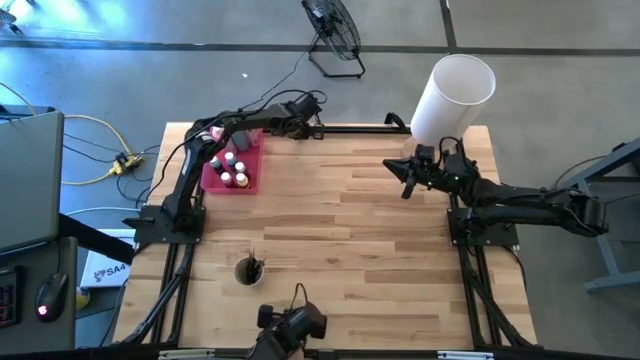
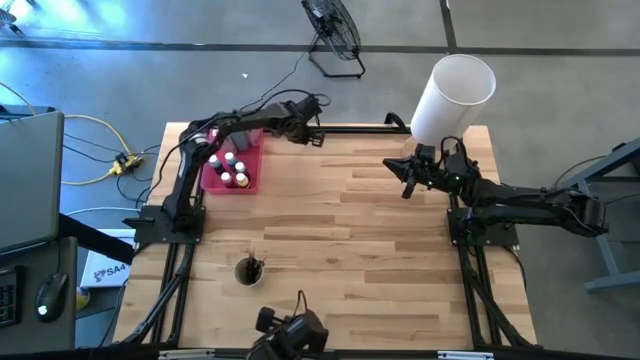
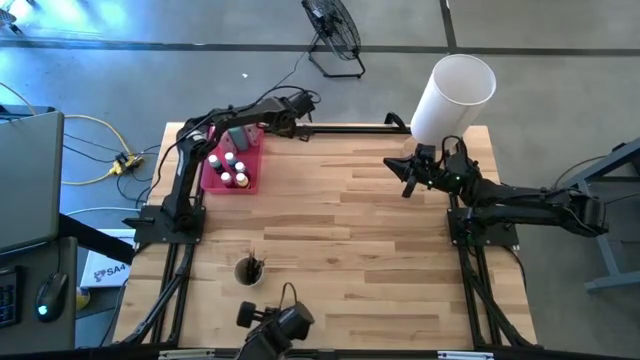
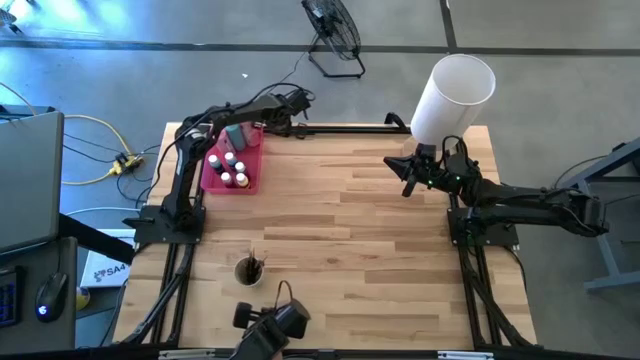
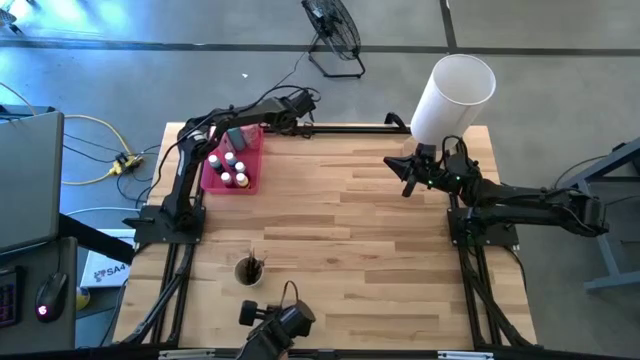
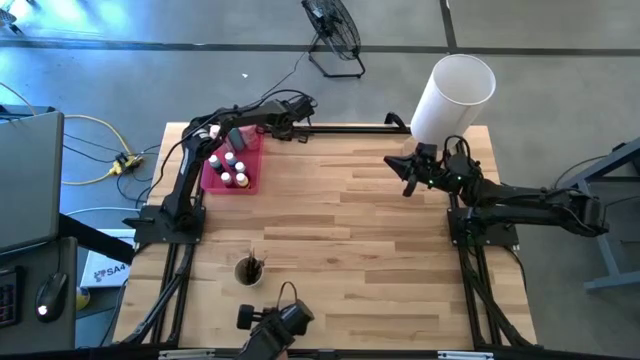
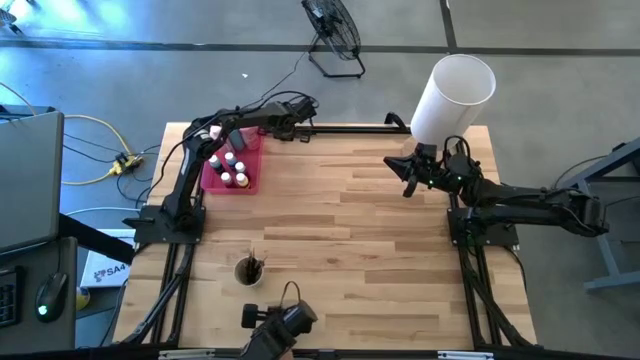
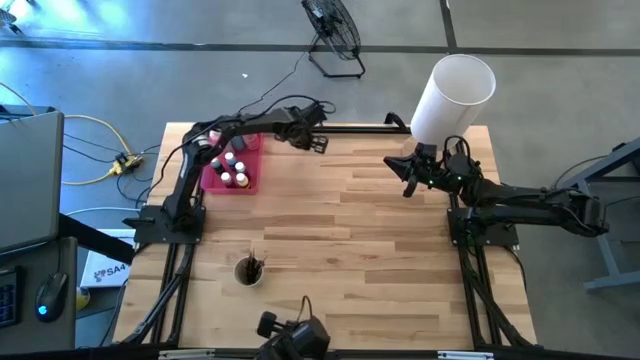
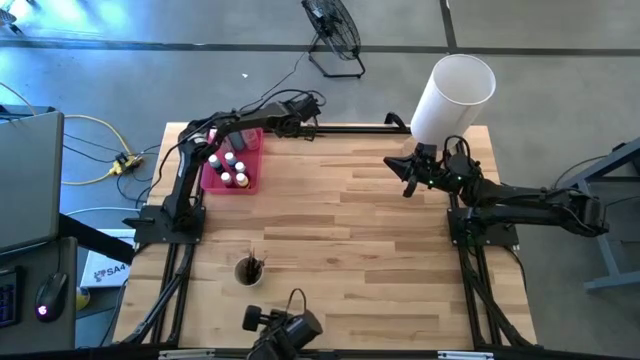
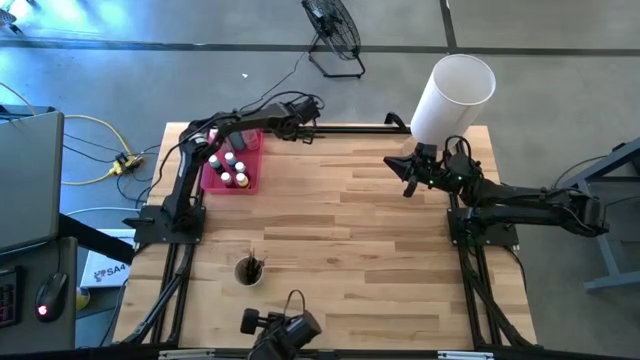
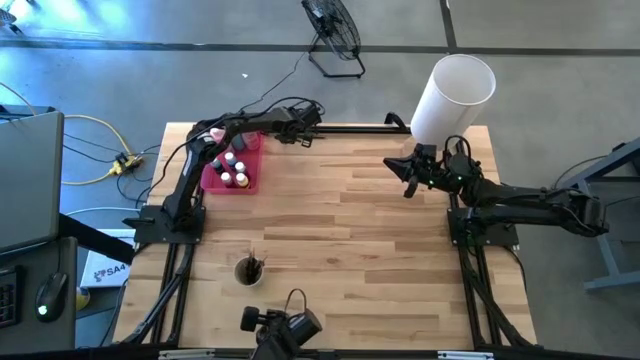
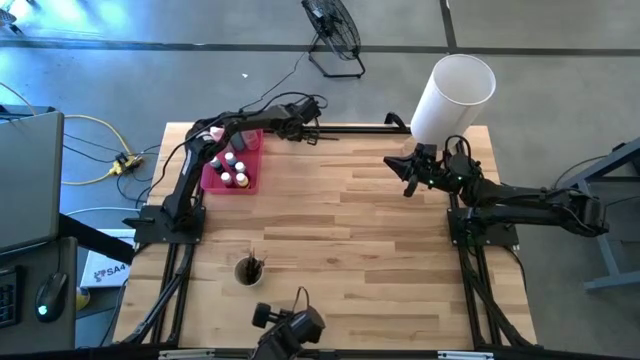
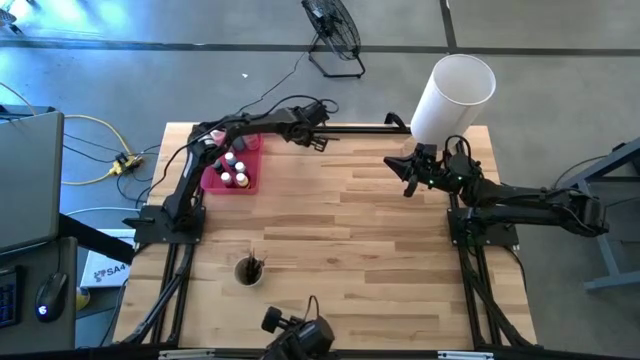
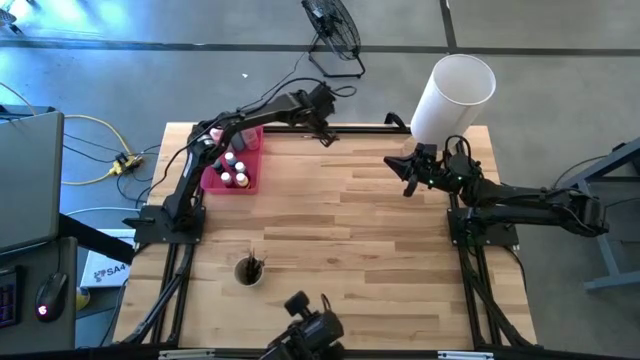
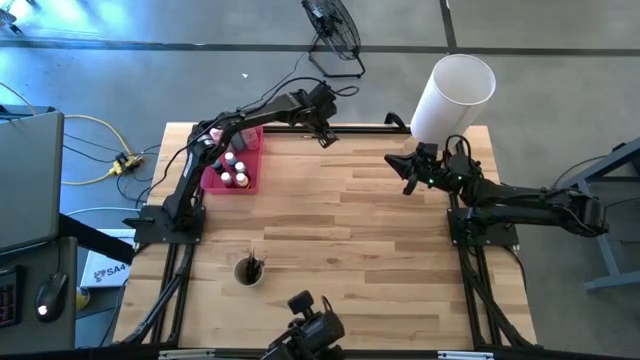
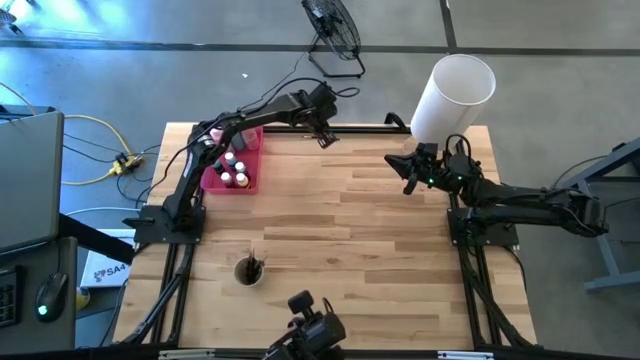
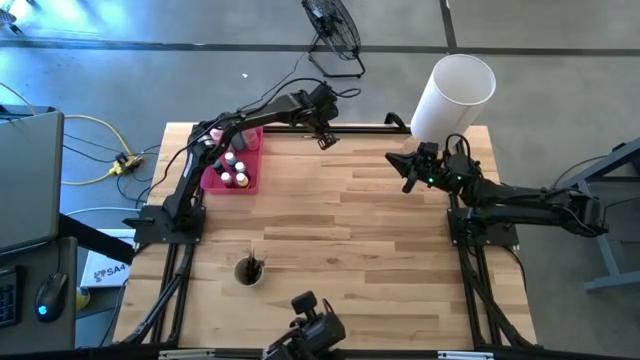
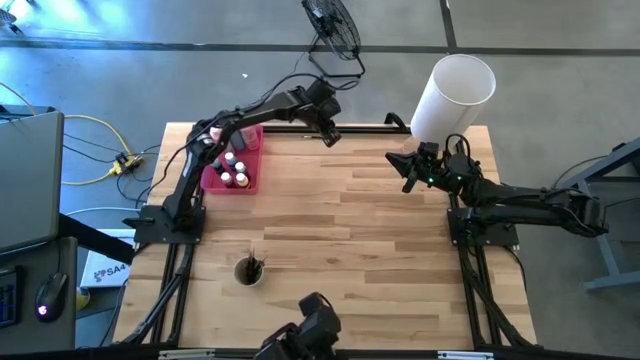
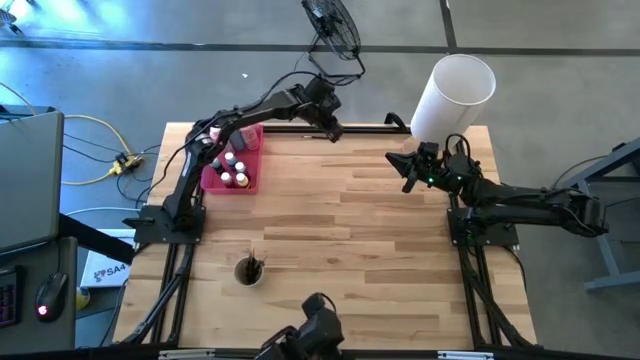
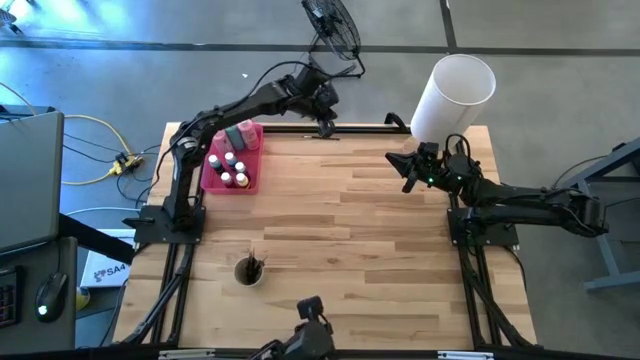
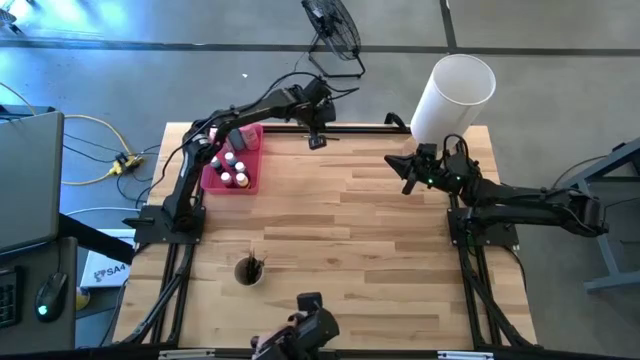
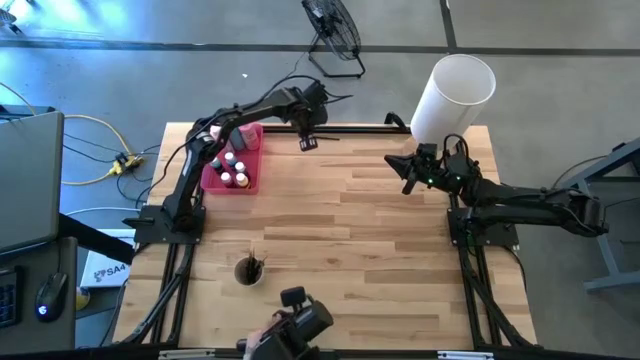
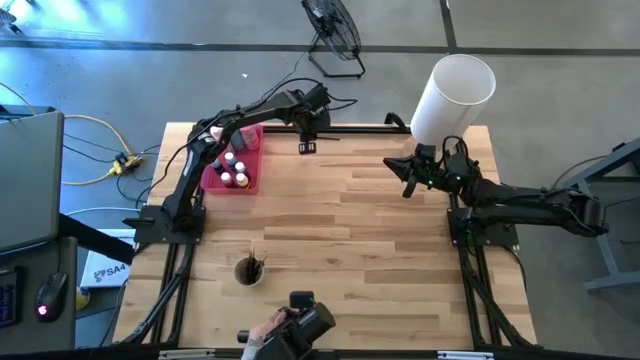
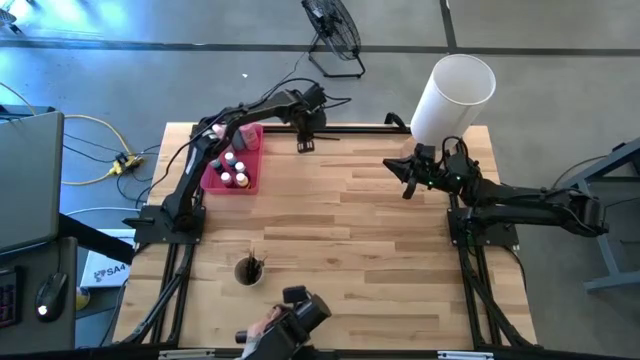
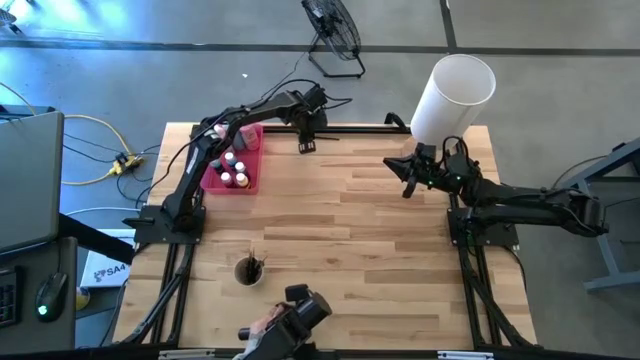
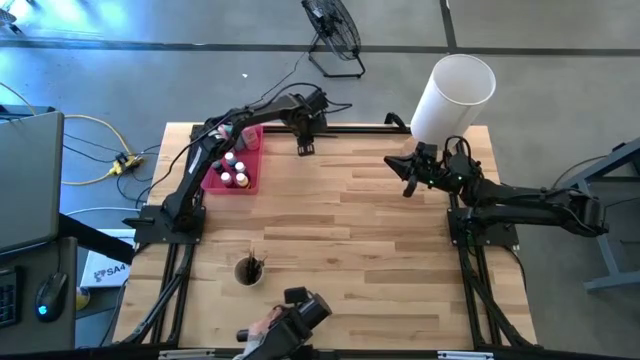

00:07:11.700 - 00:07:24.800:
Task: Pick & Place Paint Supplies
Put the silver paintbrush into the light brown cup
